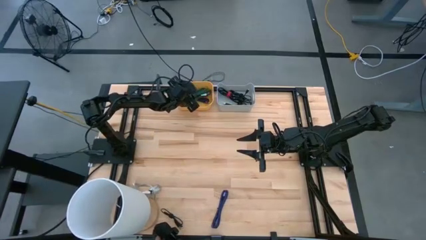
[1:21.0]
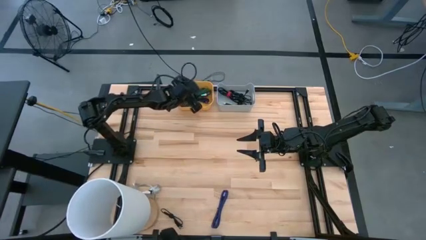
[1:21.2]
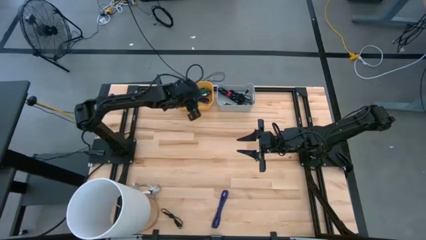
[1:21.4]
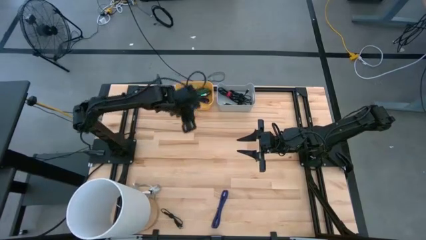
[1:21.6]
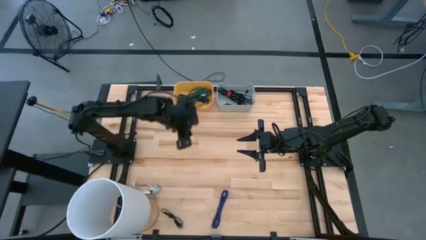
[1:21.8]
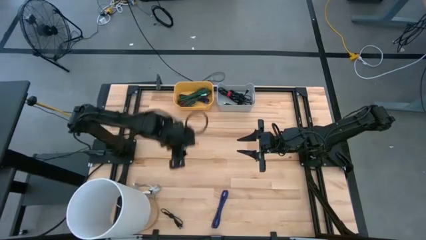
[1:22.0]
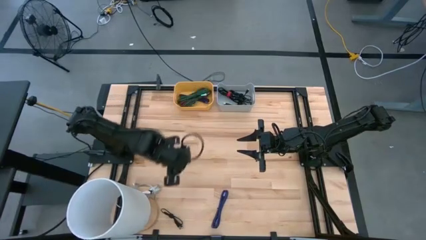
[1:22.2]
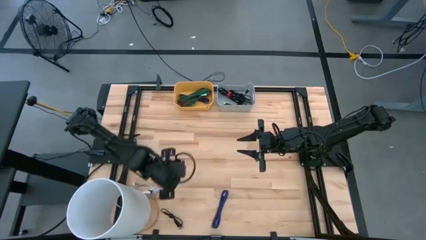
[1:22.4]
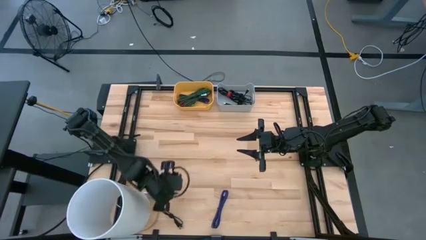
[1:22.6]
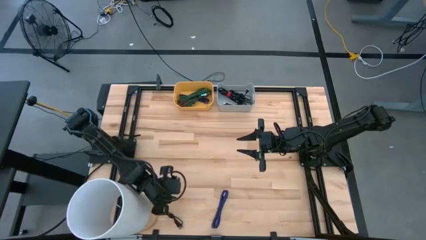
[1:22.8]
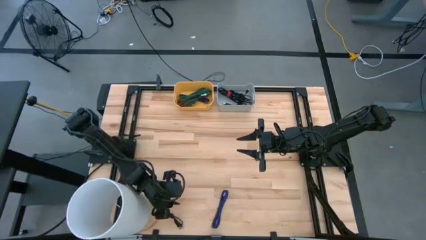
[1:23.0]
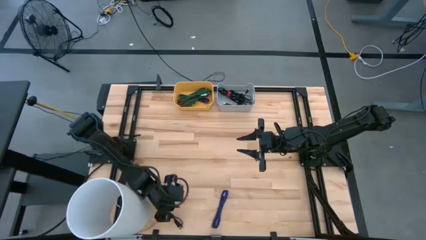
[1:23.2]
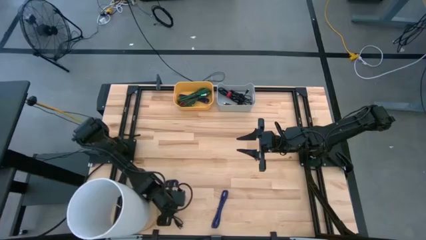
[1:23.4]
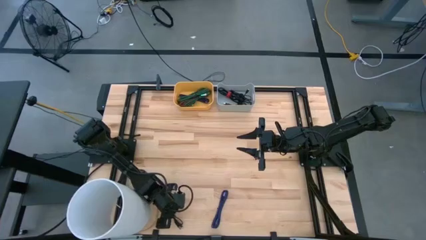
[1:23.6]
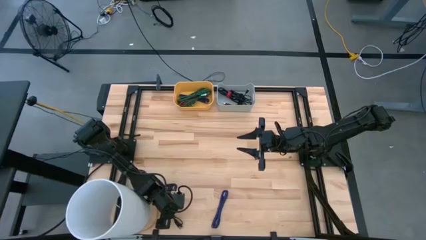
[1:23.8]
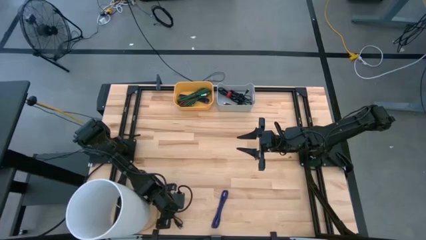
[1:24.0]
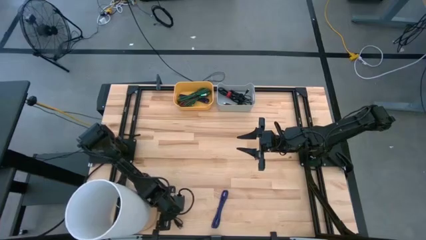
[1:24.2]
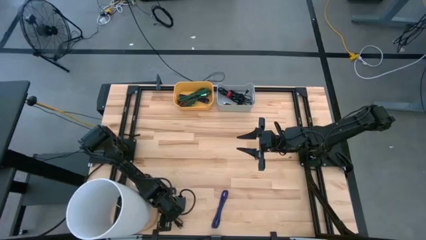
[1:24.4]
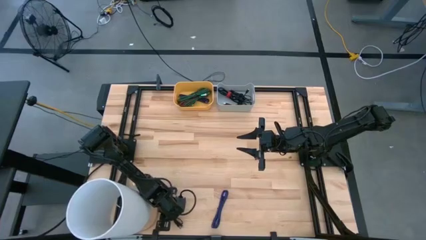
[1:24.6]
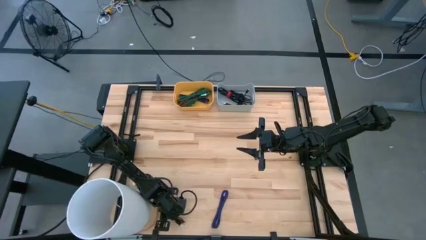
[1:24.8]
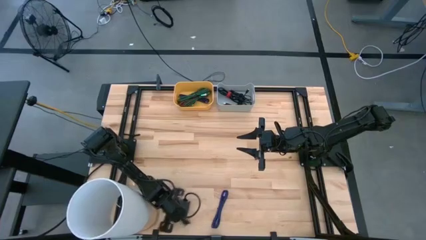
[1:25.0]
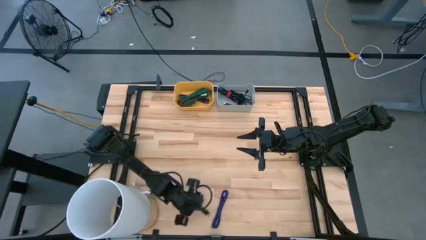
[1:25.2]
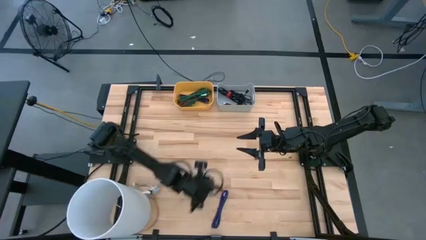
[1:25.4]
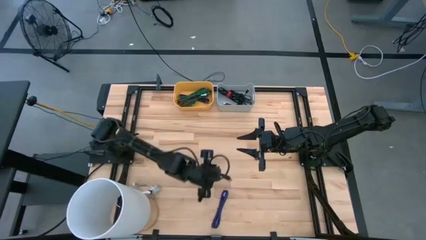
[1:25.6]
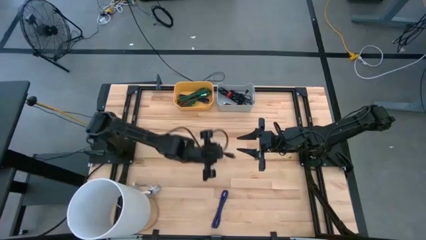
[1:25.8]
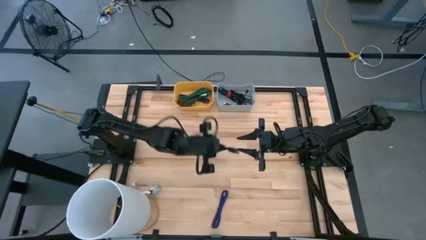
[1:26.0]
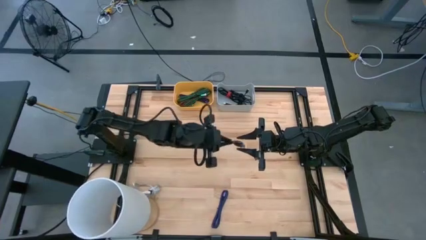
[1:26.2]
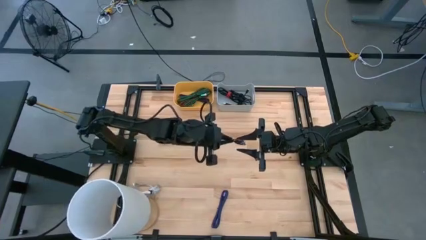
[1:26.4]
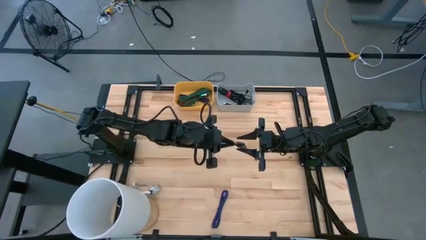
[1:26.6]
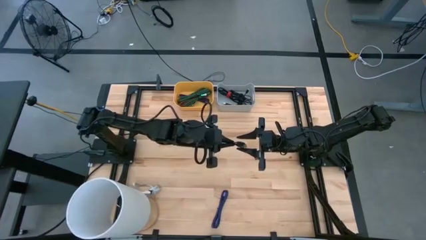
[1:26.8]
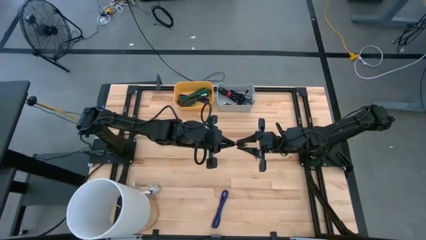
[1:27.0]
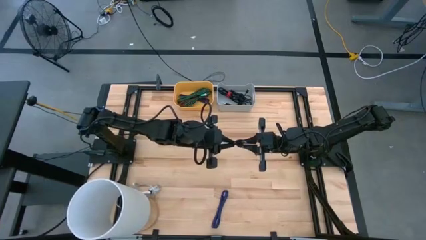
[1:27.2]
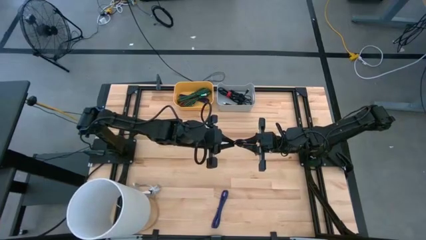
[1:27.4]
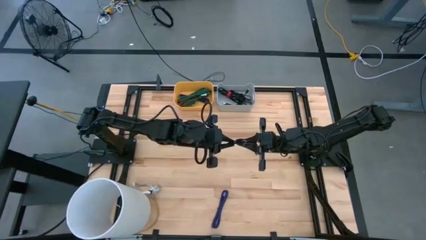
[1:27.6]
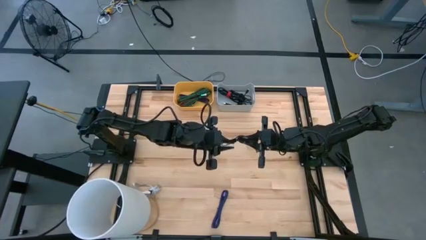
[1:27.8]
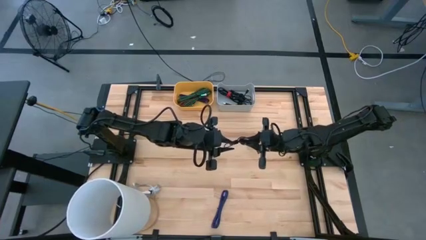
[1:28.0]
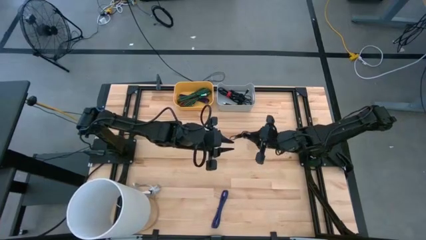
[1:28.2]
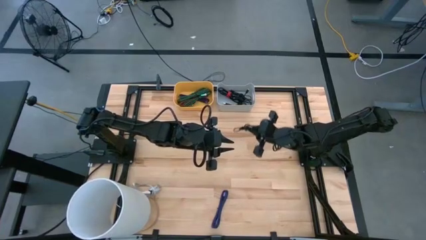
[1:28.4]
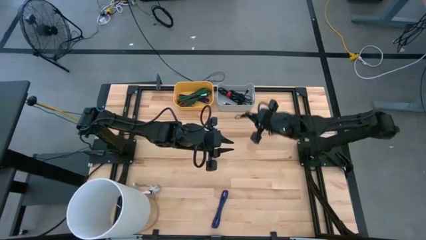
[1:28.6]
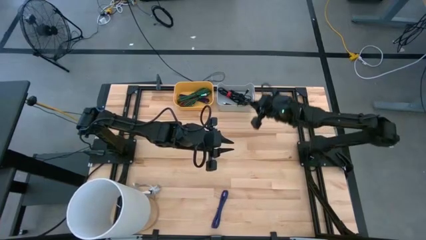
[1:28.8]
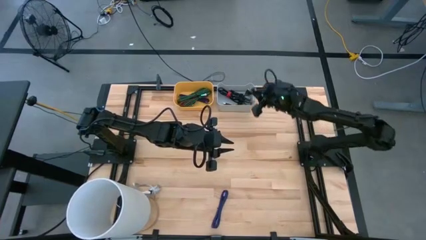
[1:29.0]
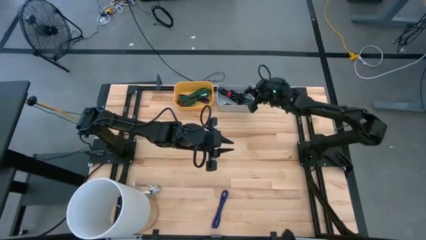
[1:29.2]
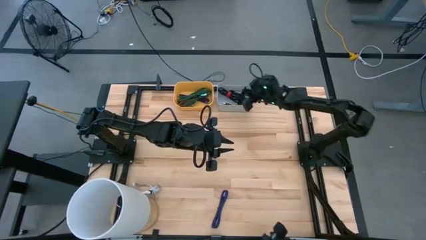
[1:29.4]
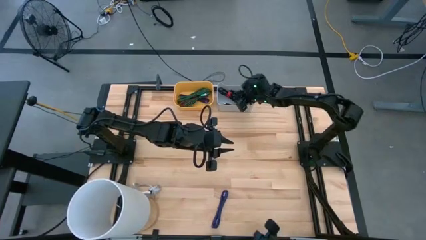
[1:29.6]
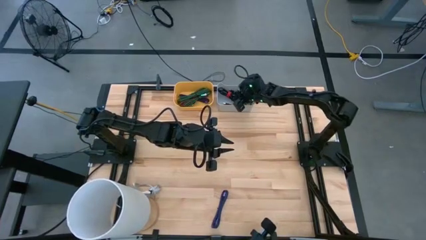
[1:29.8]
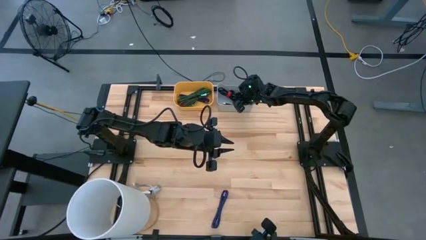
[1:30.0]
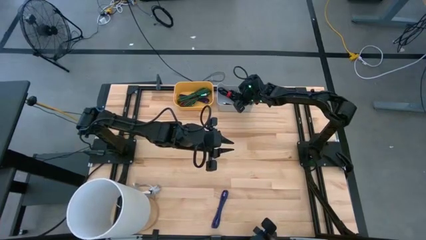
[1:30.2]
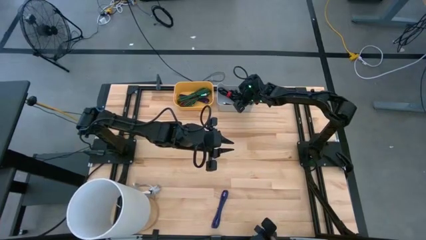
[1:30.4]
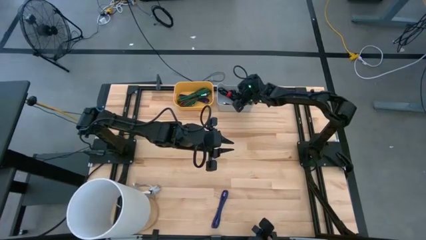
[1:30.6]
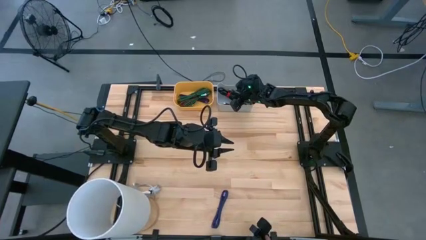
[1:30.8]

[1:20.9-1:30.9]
Task: Pick & Place USB Port
Put the black charger cable into the gray bin

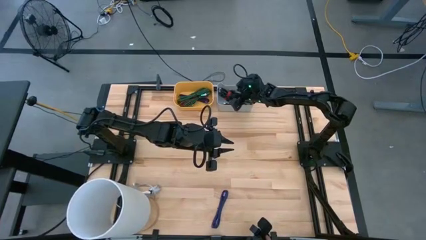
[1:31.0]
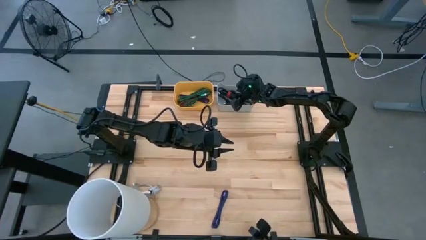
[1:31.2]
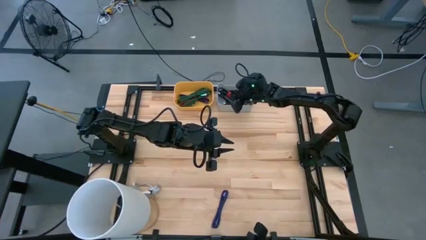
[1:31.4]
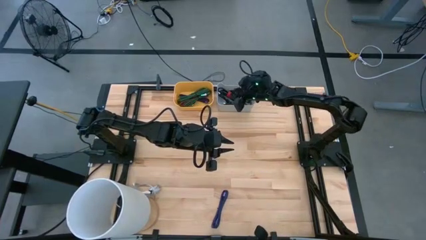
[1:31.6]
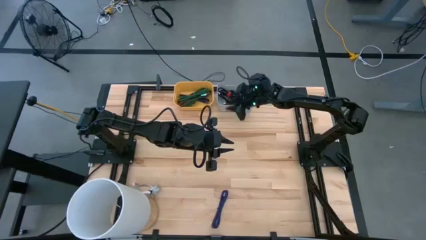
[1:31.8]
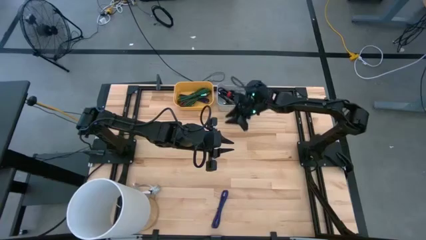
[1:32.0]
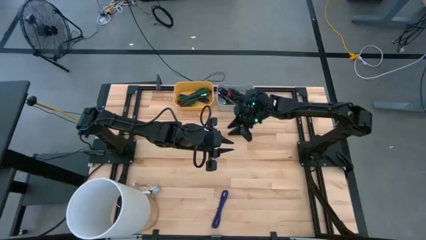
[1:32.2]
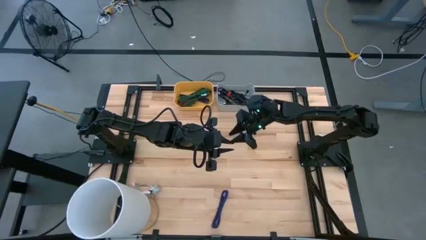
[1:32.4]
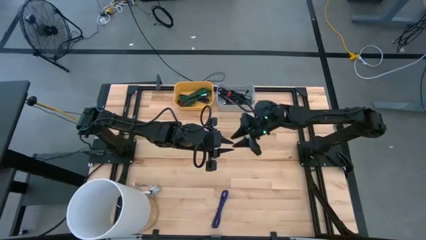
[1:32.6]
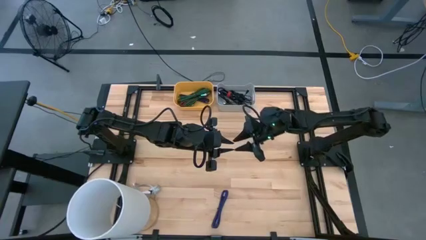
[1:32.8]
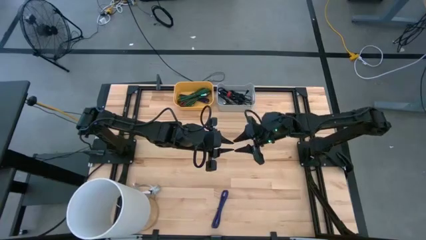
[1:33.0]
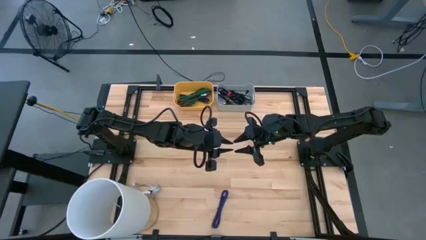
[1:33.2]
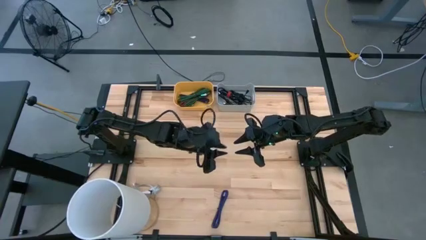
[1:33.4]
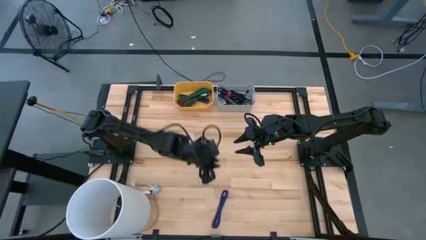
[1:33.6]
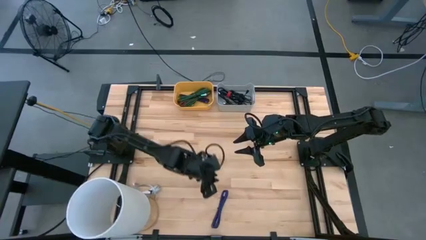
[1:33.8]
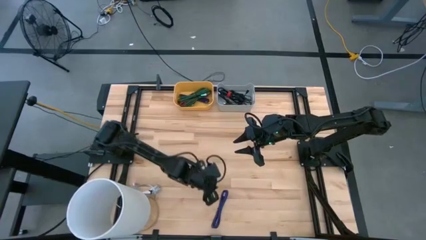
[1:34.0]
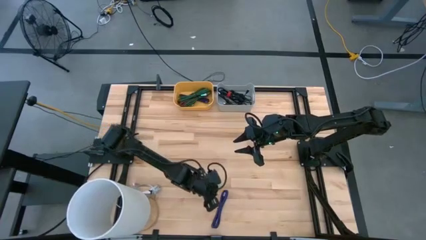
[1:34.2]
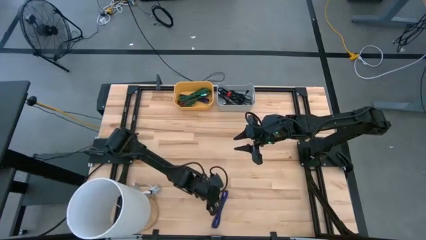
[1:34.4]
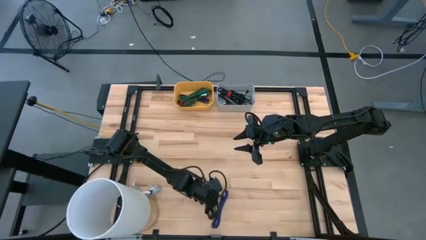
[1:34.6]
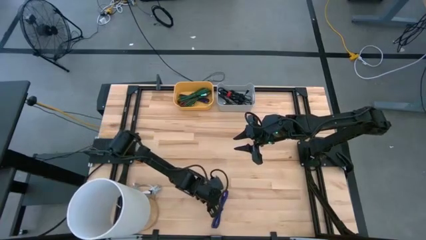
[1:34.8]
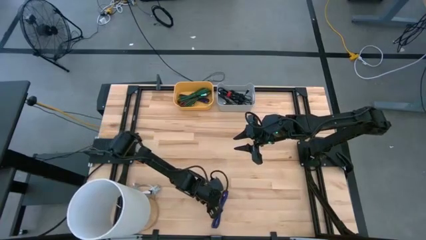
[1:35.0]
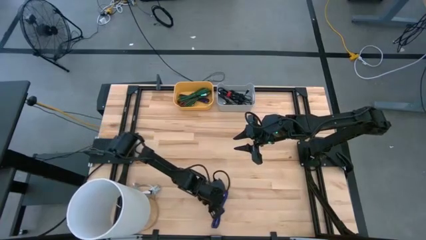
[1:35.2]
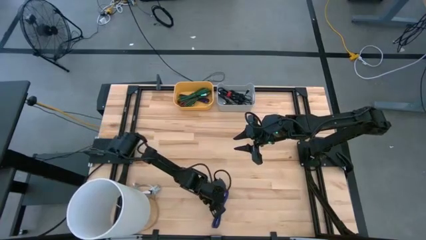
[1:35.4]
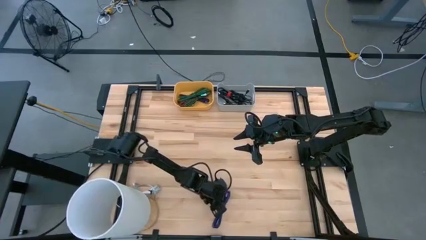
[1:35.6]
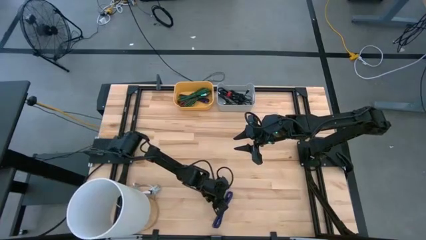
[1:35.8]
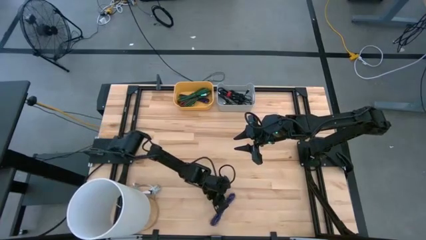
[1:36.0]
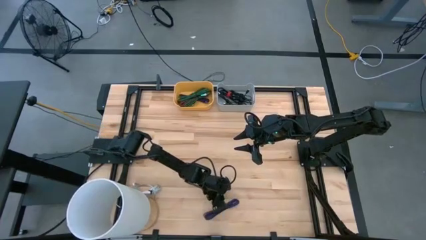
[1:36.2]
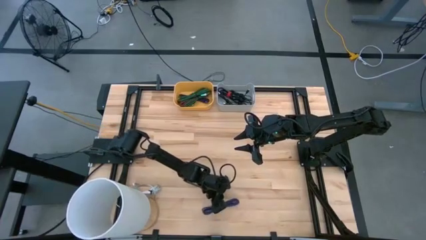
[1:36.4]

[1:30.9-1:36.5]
Put the violet black charger cable into the yellow bin
